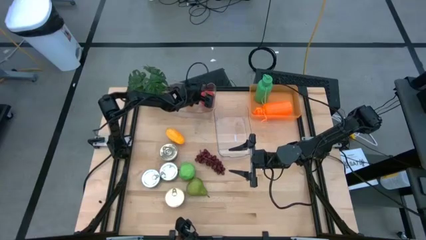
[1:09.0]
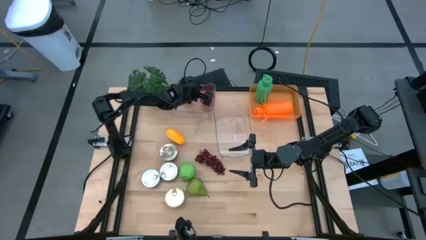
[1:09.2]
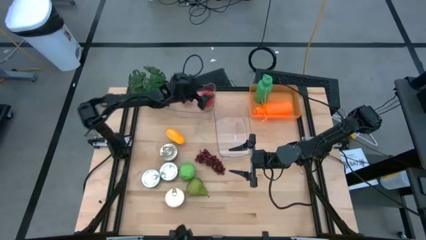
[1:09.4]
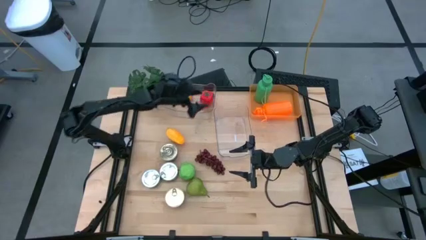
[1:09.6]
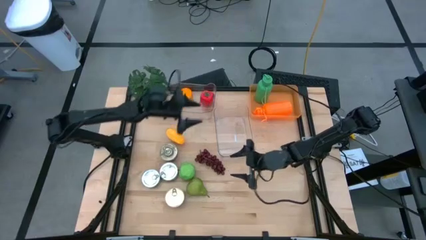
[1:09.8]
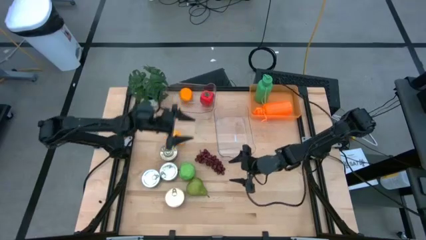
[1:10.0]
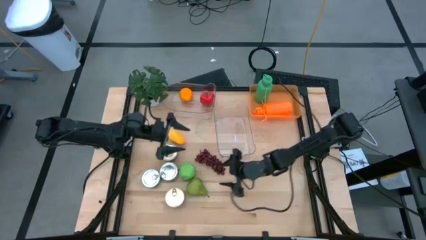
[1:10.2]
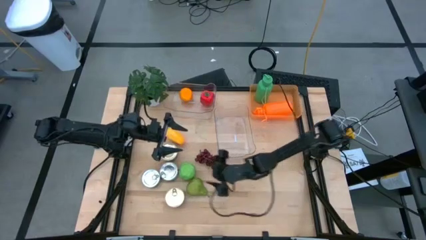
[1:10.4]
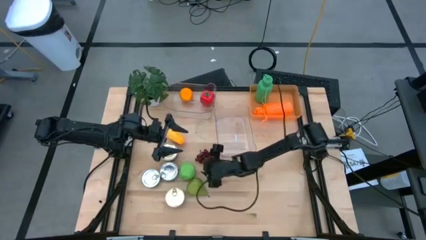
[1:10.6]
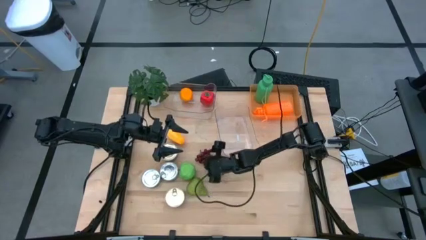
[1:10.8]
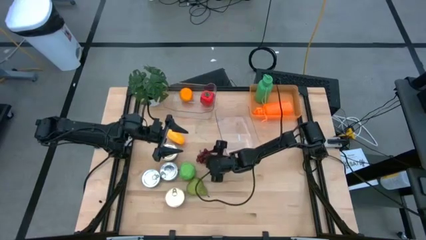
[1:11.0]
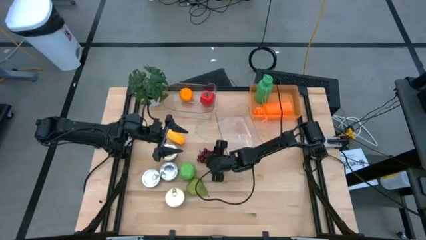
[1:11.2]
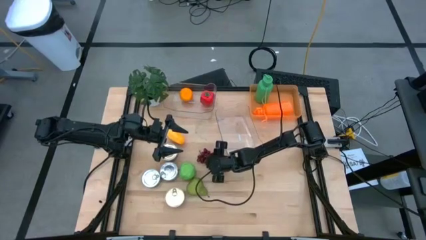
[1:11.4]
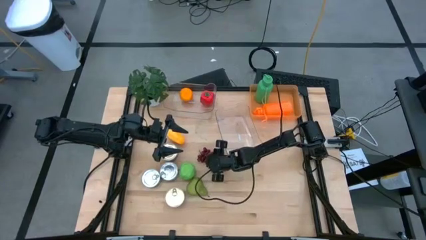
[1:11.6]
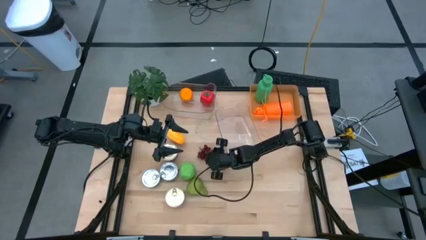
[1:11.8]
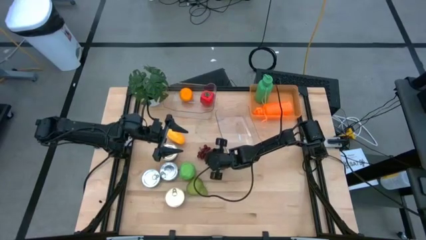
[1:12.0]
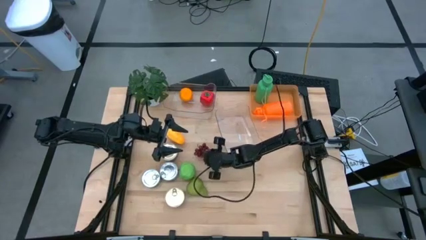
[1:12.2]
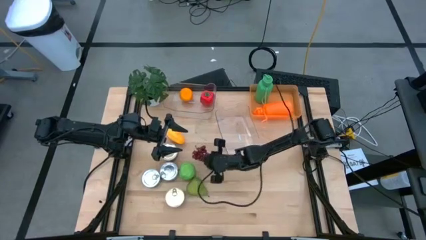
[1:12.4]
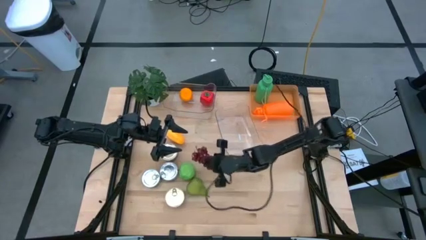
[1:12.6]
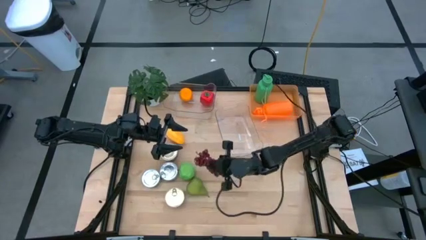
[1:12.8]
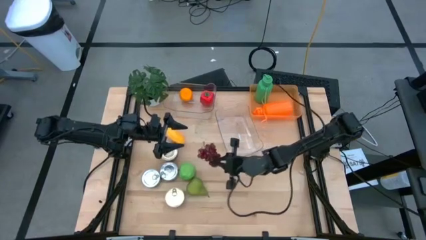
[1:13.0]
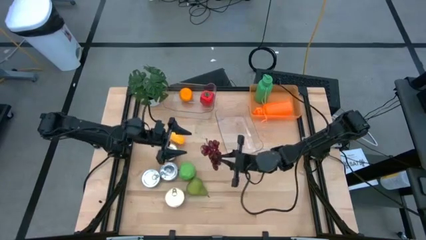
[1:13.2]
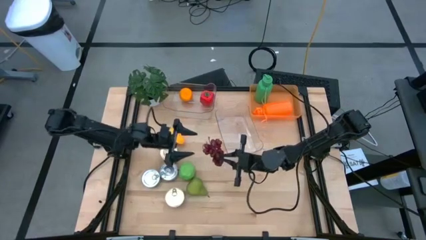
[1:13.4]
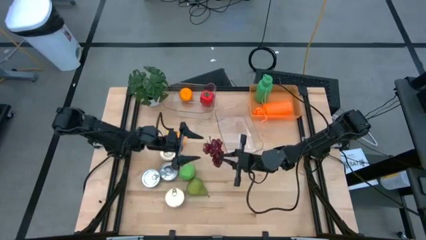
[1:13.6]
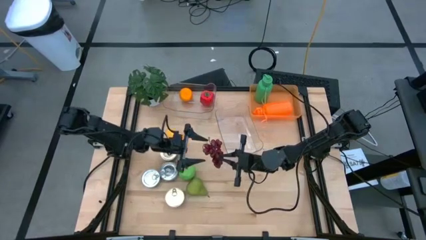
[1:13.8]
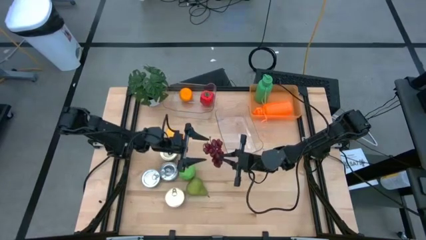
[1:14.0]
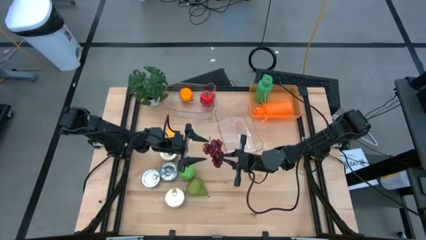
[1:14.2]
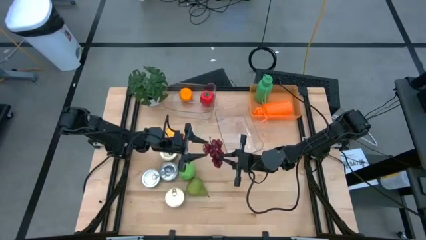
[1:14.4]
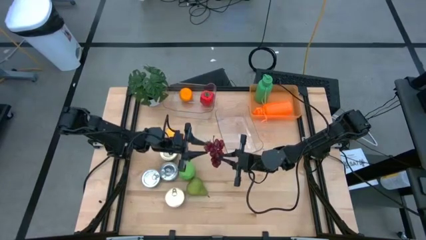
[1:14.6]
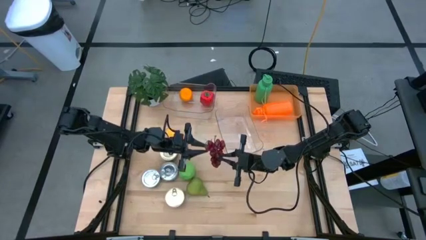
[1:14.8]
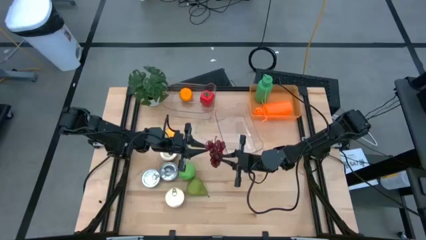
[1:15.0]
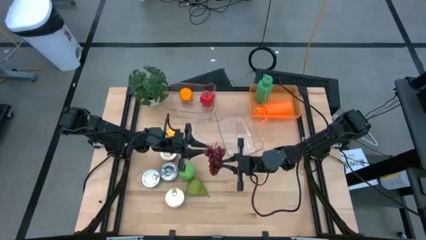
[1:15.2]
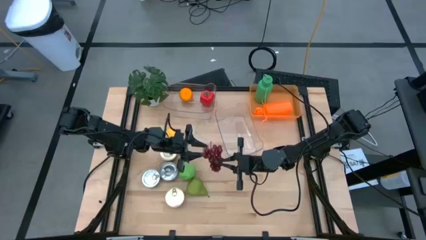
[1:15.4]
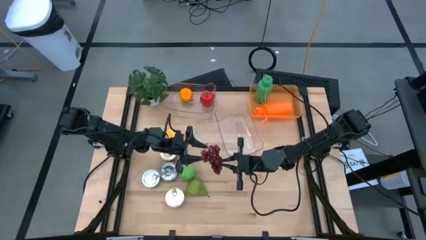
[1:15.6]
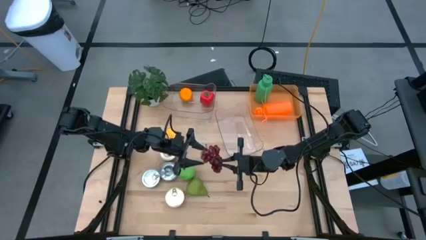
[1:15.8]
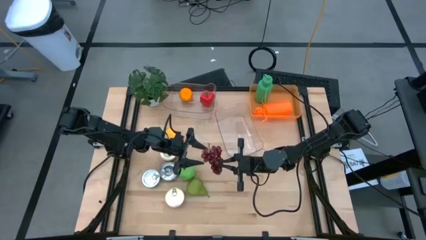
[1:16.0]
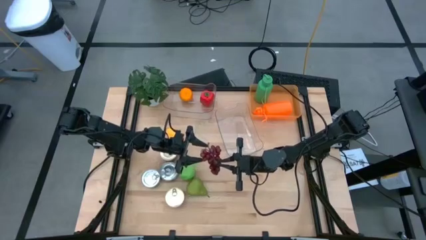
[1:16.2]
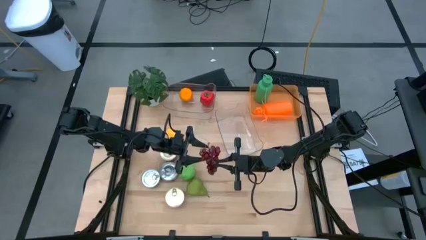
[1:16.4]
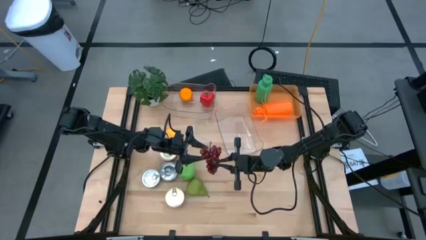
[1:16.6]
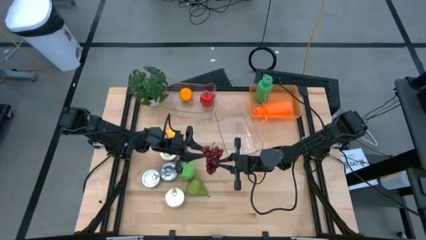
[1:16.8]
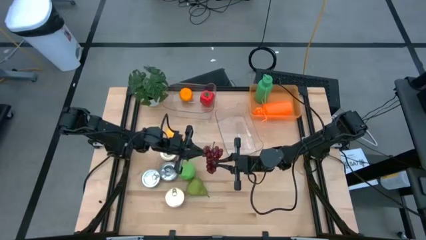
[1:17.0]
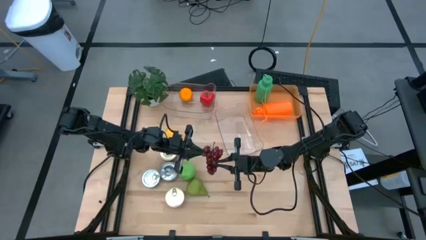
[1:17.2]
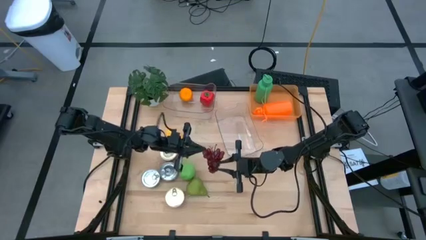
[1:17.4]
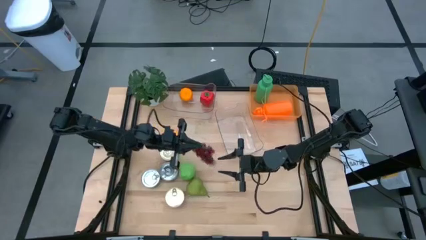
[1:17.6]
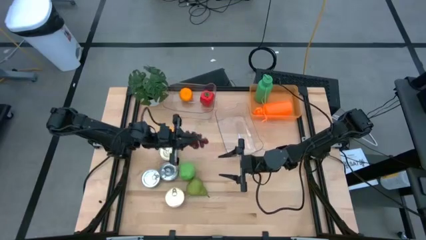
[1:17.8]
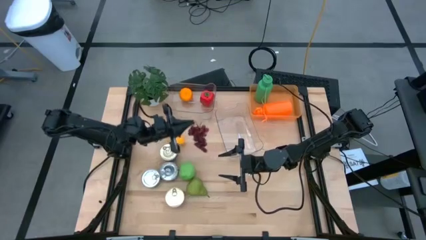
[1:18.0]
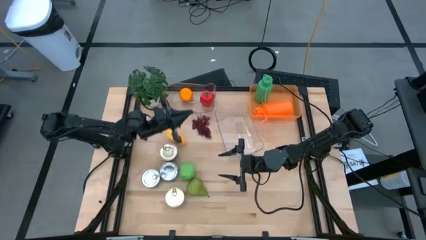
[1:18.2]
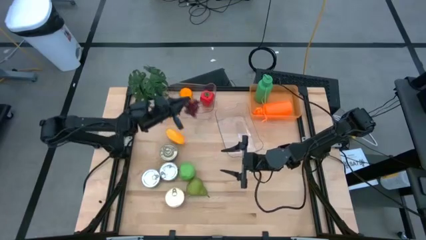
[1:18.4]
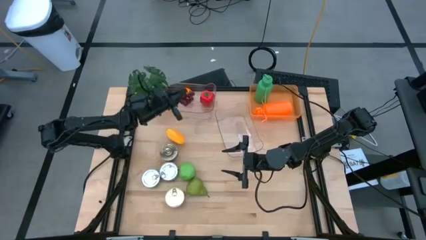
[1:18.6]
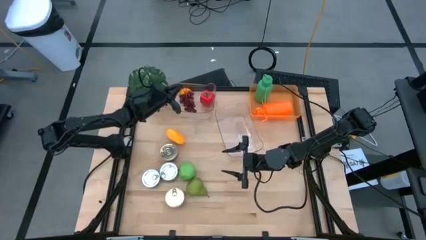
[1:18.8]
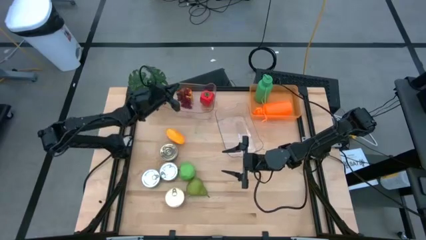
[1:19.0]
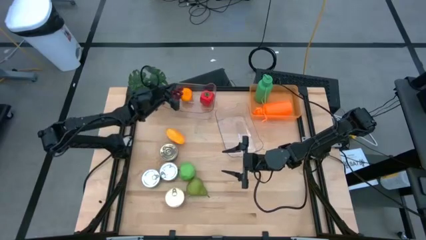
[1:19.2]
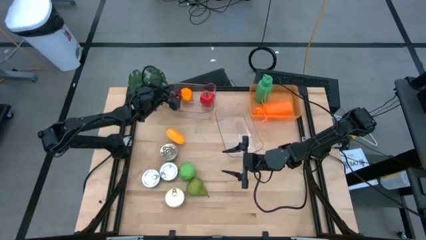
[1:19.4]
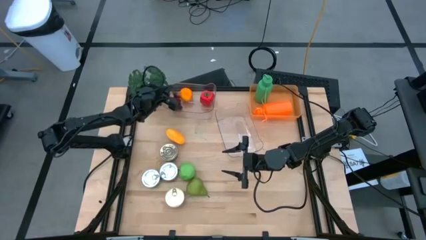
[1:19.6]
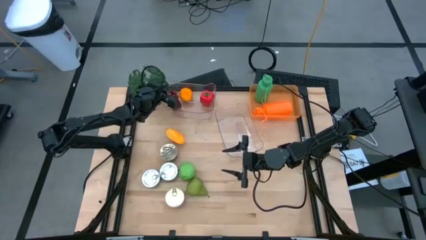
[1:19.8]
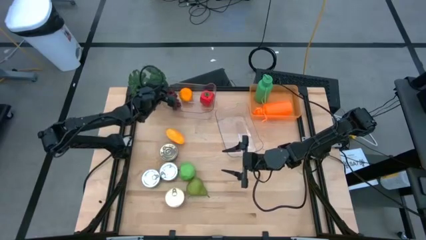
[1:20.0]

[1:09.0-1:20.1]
Task: Pick & Place Food Item
Put the purple grapes into the top transparent bin

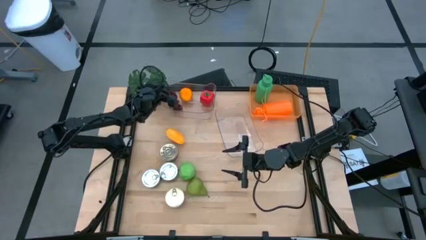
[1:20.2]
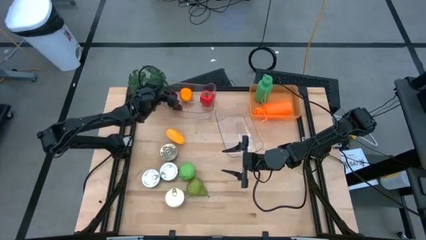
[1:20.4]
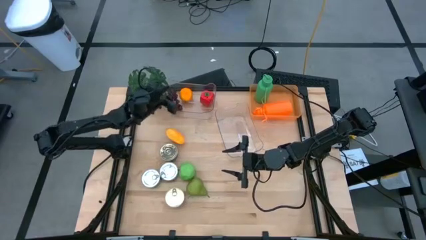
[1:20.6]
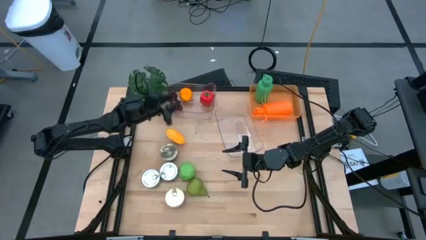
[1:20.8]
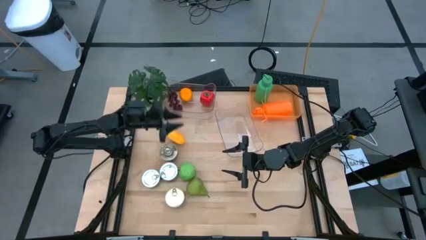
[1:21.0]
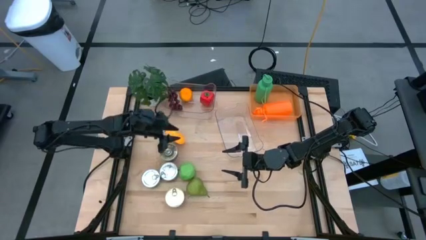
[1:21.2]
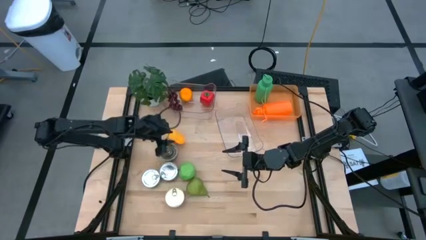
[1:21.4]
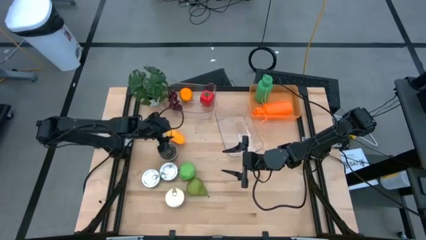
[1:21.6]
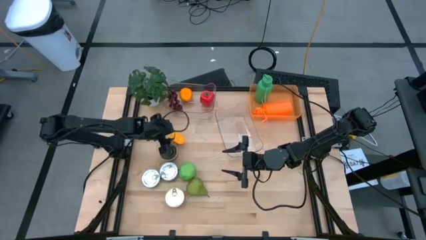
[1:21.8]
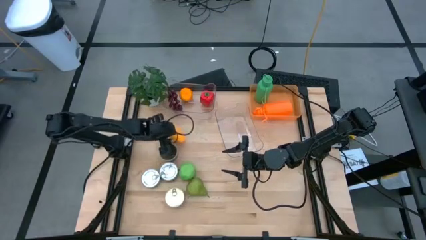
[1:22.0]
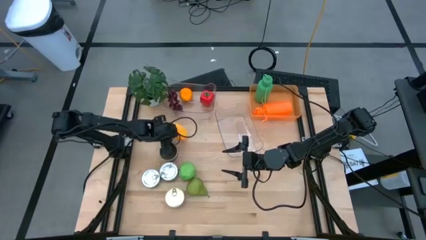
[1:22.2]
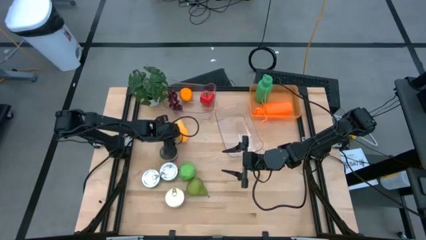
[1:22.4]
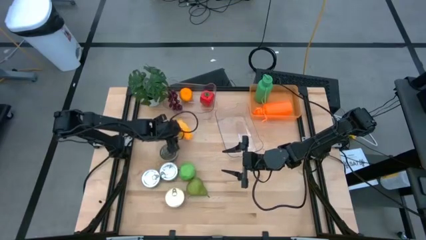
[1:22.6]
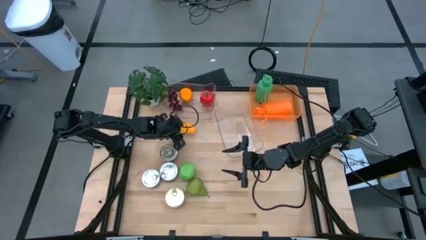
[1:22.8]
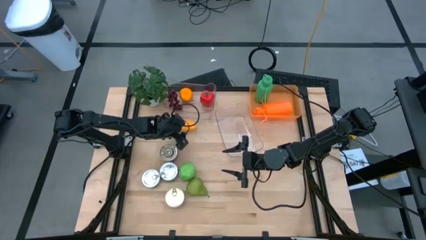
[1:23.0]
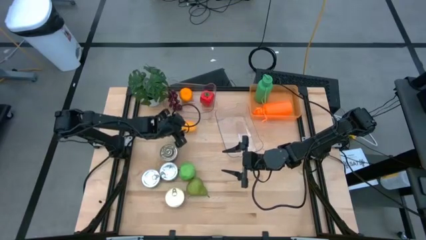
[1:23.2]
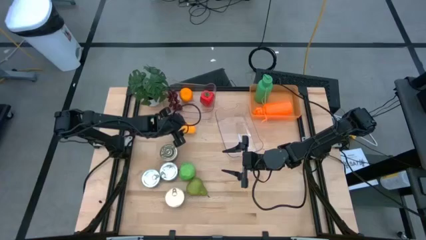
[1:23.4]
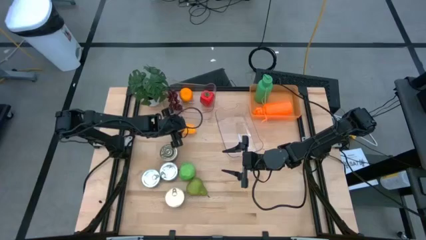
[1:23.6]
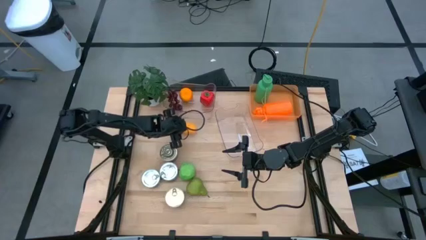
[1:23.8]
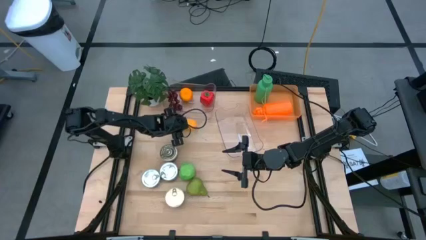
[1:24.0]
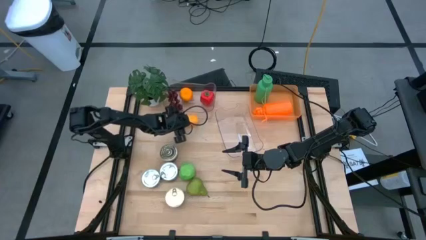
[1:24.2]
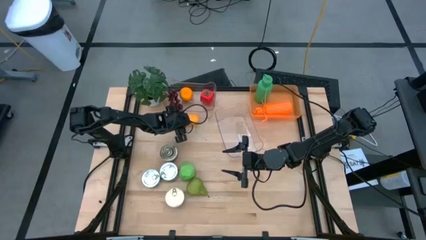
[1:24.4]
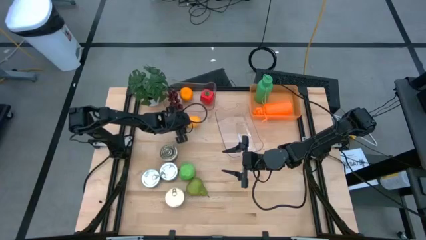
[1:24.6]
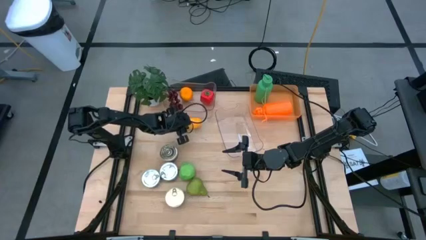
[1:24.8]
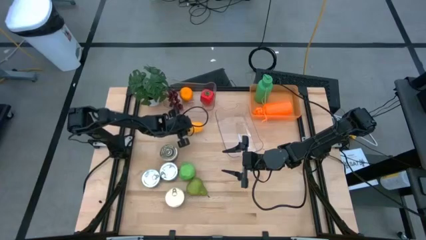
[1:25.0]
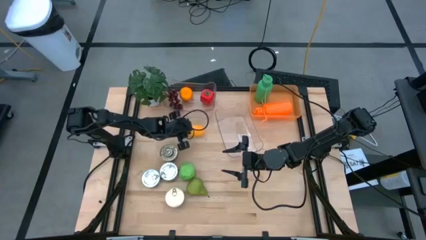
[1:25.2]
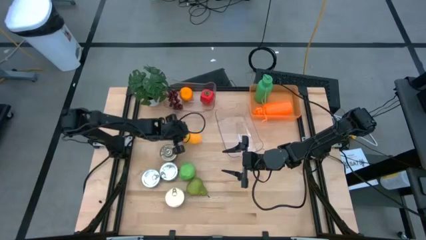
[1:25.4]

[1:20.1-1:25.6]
Put the yellow mango into the top transparent bin
